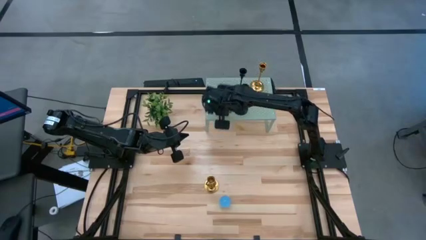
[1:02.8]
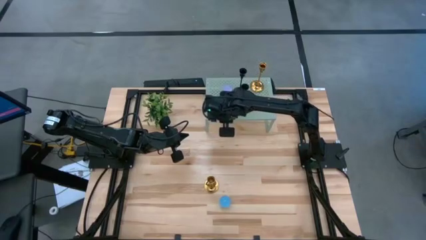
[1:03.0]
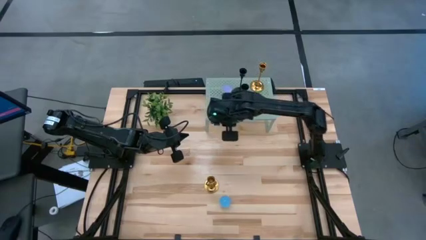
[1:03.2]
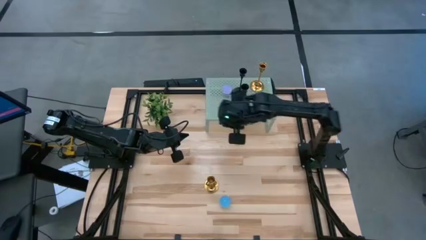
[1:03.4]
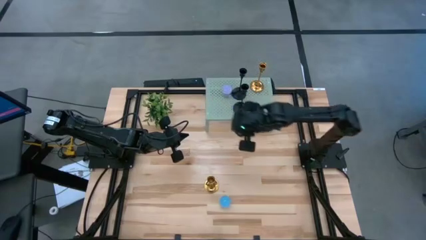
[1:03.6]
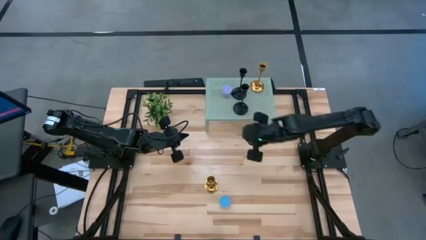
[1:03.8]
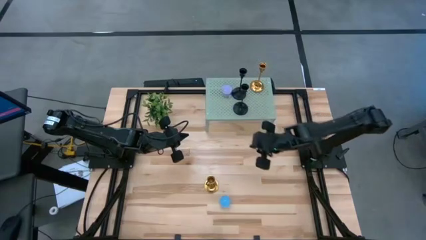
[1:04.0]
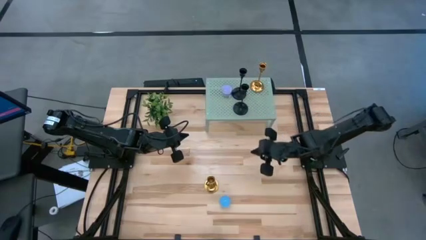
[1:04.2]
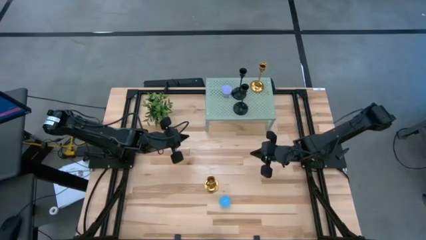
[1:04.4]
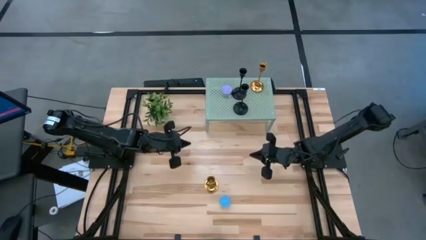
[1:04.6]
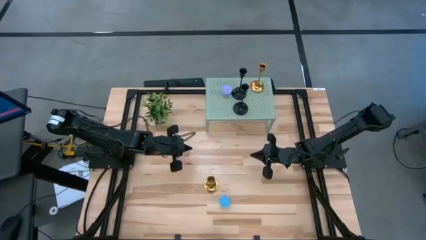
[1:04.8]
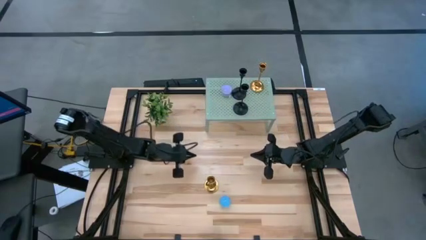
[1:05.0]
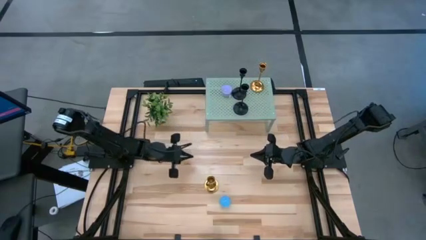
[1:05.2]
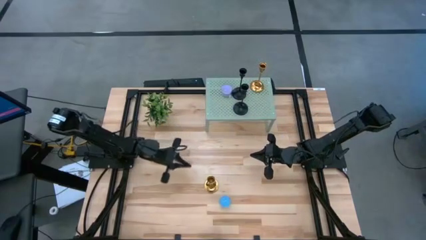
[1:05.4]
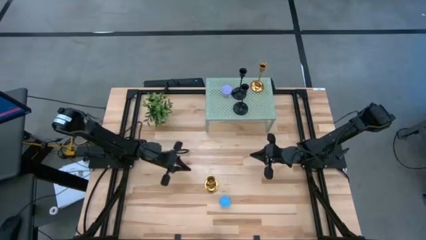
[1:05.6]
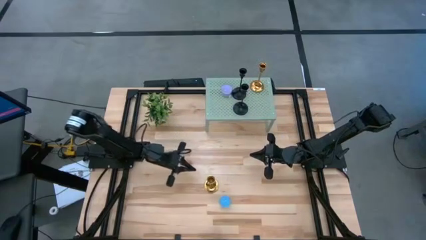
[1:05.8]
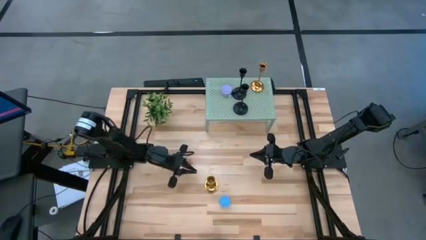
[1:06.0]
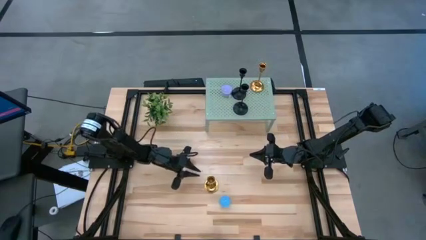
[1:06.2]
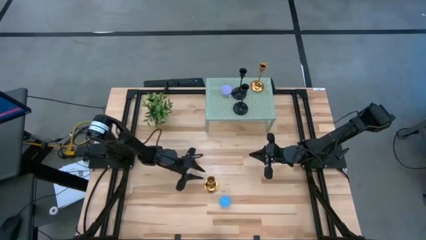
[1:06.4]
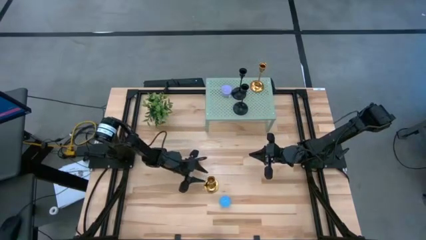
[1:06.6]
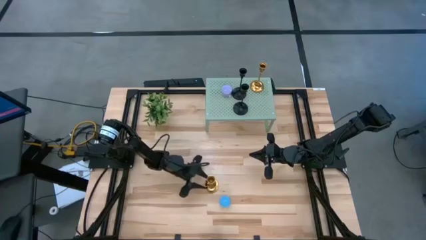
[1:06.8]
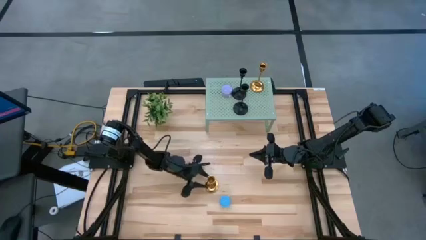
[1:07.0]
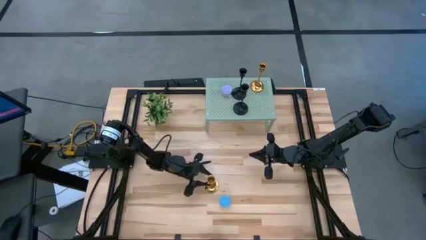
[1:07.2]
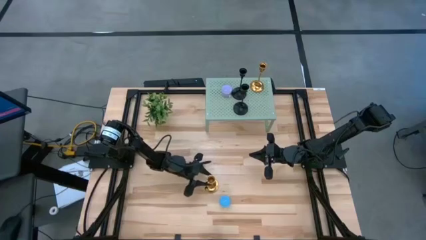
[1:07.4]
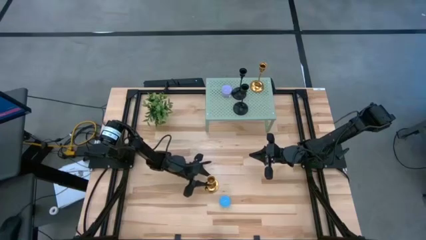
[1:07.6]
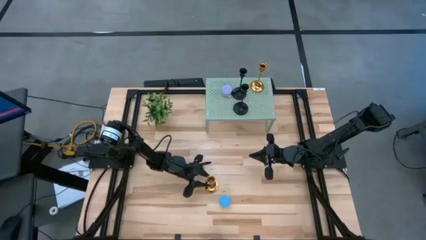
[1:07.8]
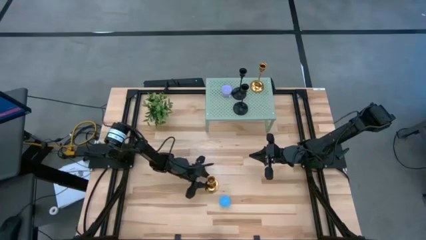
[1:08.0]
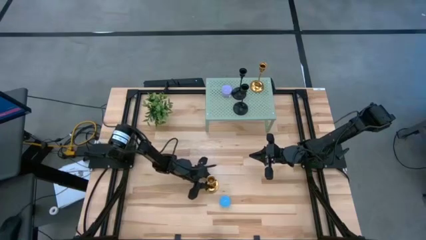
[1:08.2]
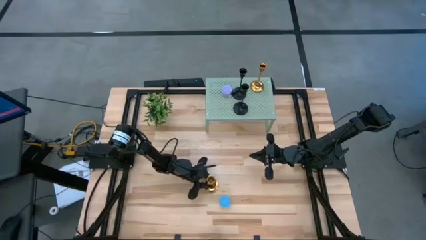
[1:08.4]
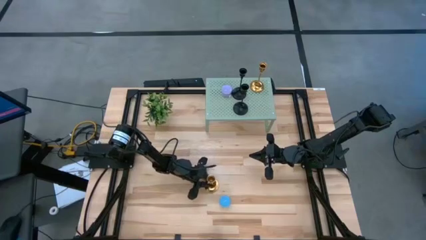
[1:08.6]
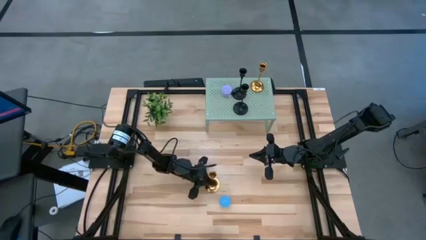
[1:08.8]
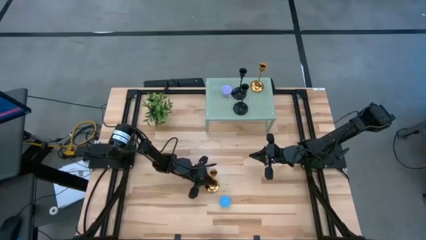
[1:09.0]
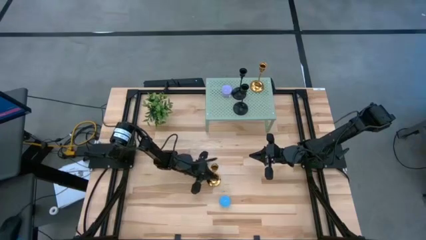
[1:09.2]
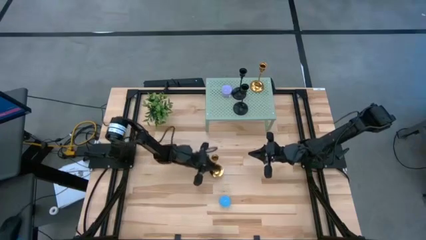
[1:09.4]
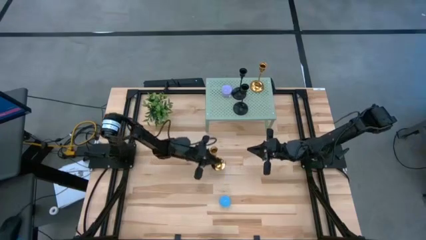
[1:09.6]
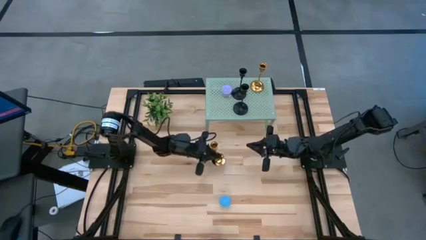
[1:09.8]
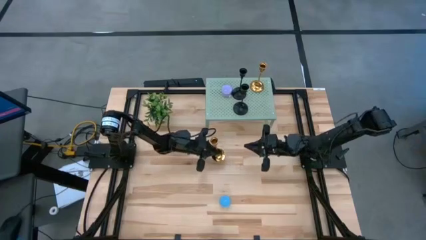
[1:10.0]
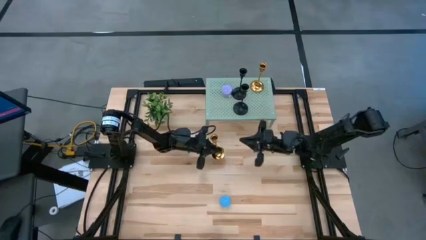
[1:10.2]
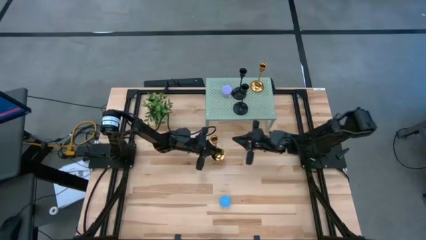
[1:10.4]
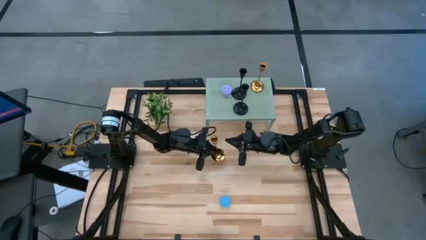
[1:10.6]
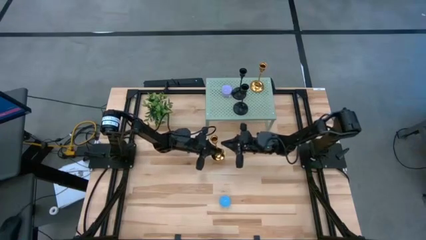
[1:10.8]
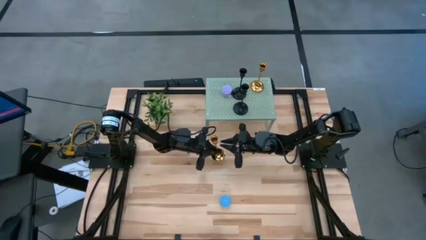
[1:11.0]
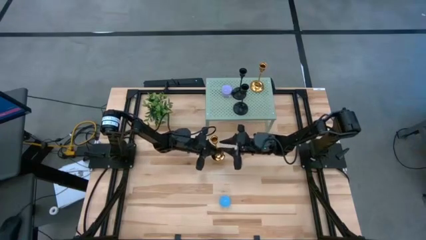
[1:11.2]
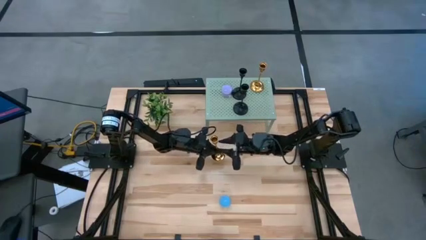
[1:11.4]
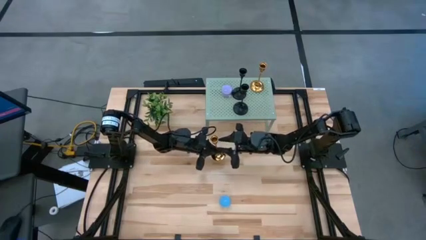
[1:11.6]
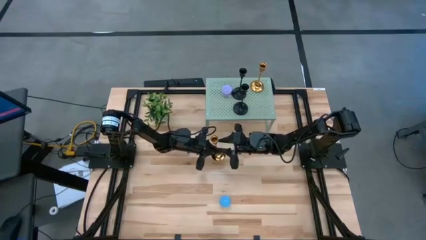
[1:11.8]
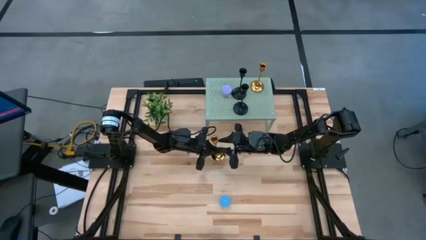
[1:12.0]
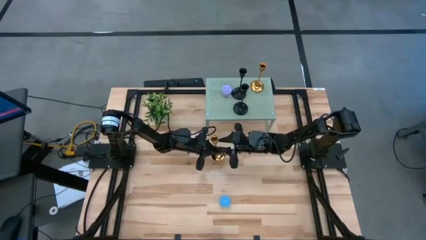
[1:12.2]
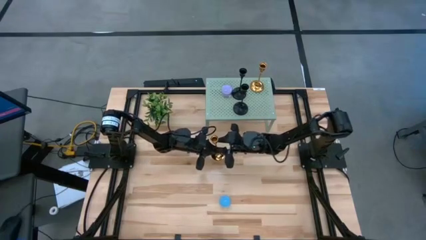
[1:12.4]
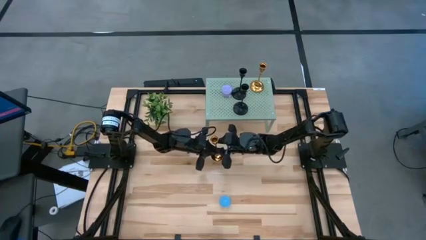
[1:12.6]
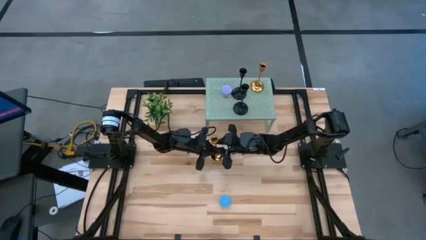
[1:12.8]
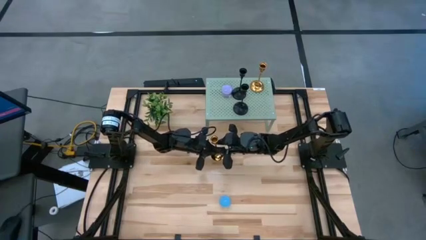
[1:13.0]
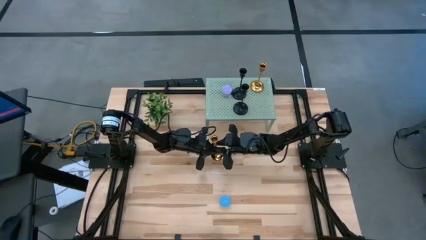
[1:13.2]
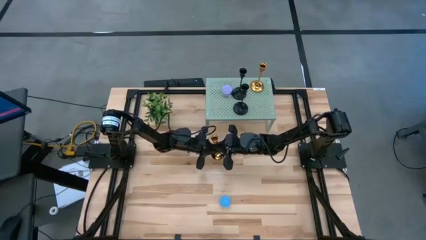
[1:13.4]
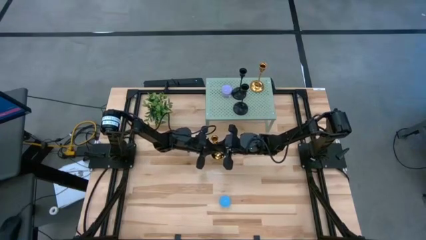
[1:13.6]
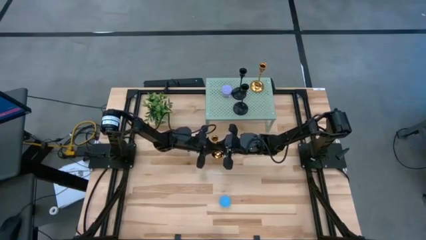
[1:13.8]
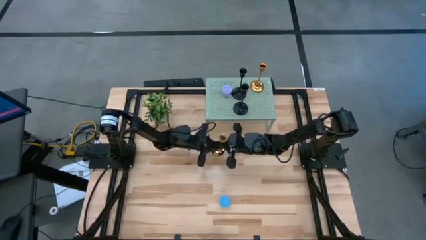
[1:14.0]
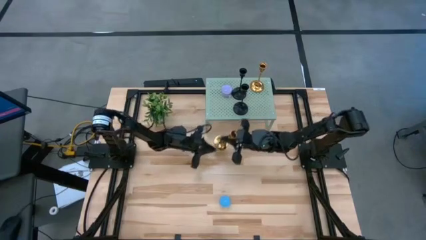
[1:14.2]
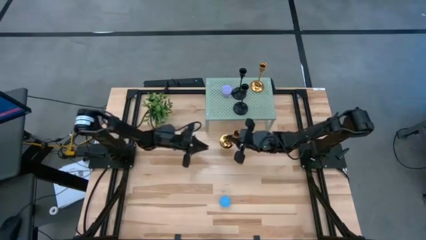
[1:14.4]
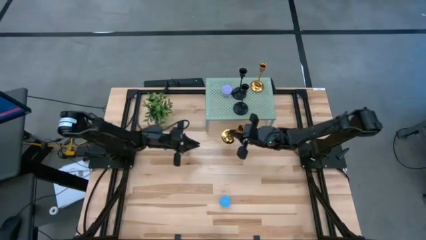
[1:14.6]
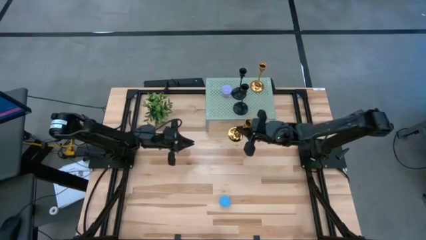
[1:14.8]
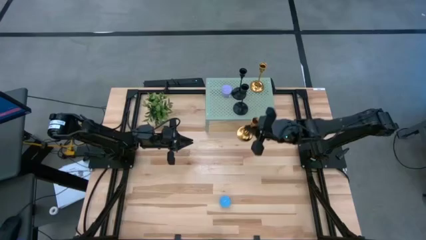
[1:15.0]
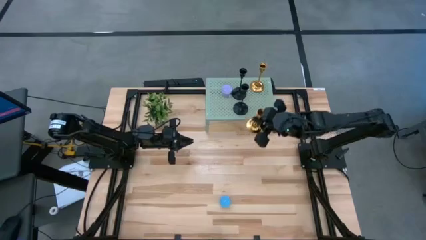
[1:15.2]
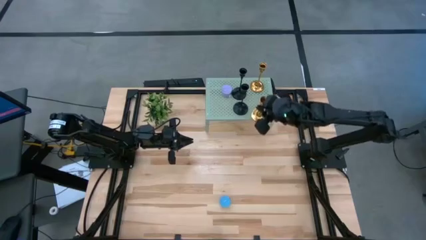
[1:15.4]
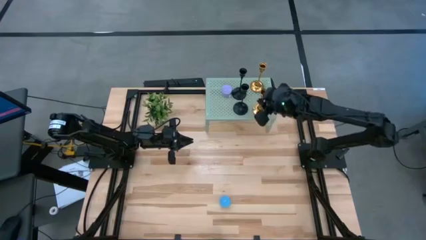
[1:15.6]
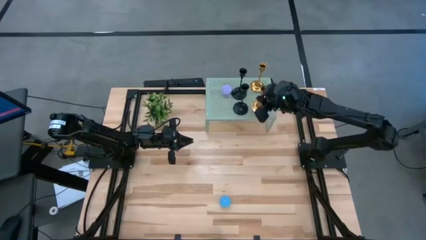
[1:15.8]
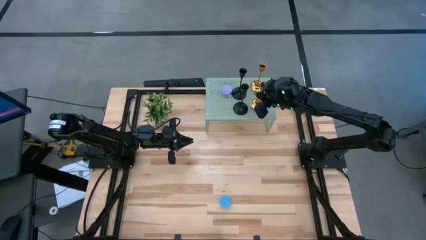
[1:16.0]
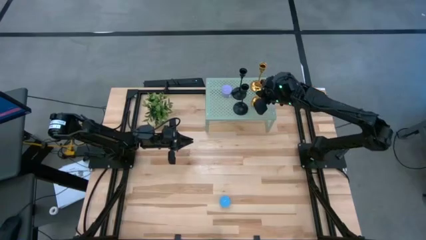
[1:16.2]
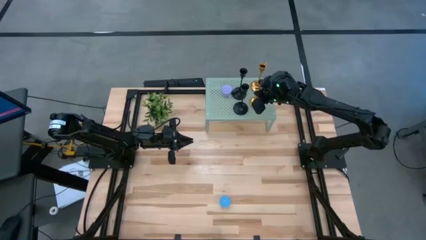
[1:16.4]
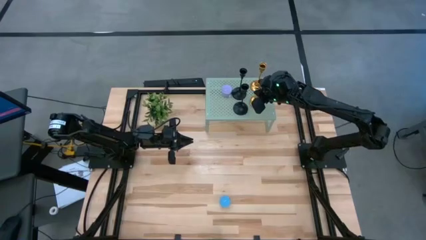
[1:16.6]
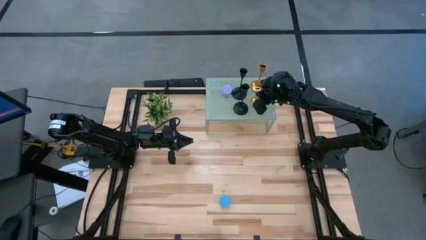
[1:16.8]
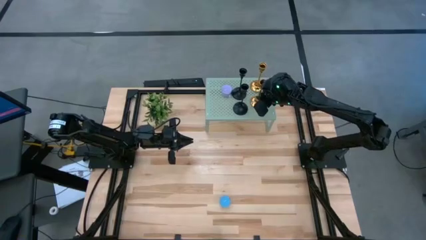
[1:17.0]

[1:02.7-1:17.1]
Task: Pick & Place candle stick holders
Align the gold candle holder with the other gold candle holder on the shelf
